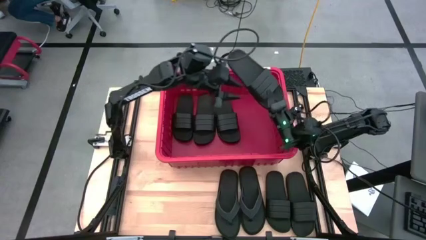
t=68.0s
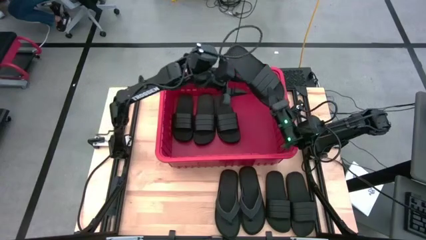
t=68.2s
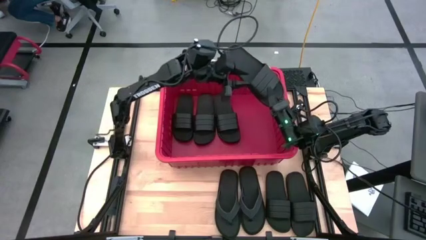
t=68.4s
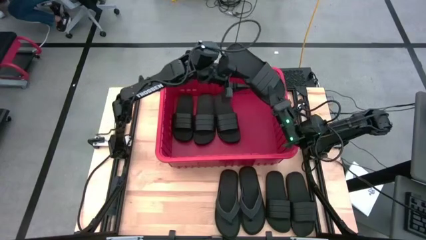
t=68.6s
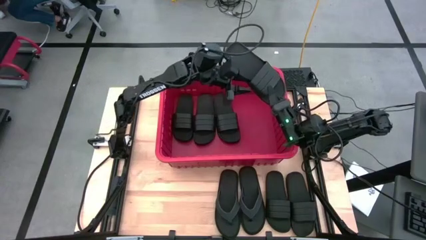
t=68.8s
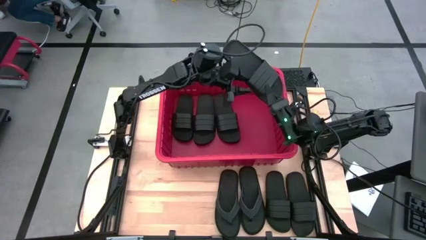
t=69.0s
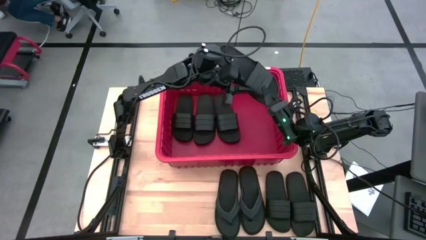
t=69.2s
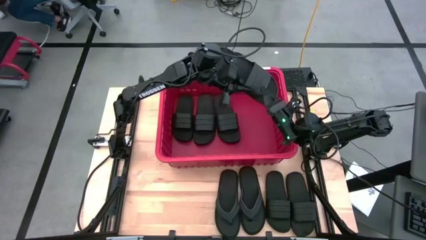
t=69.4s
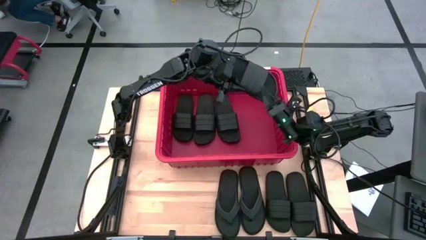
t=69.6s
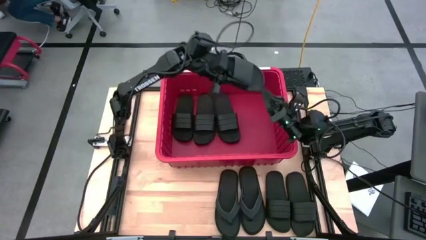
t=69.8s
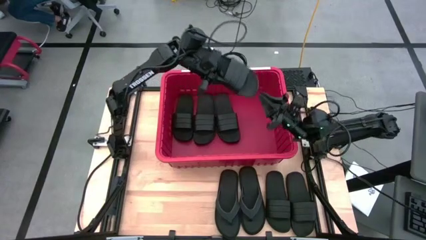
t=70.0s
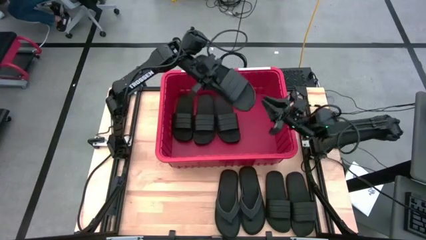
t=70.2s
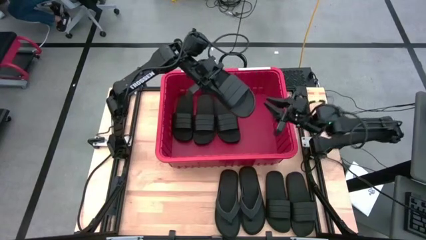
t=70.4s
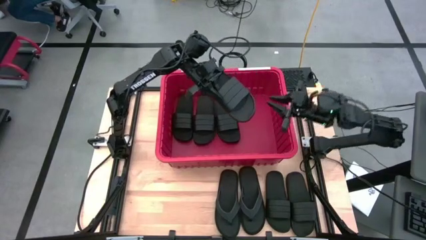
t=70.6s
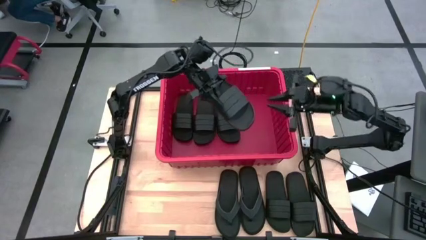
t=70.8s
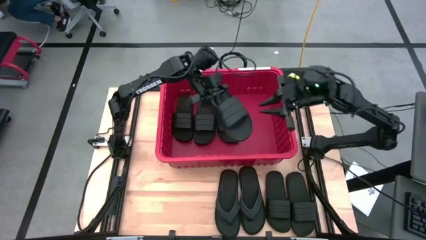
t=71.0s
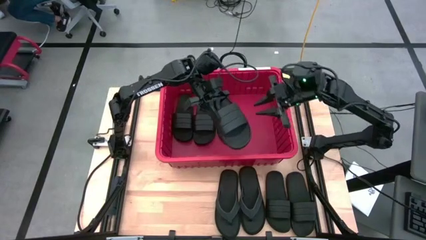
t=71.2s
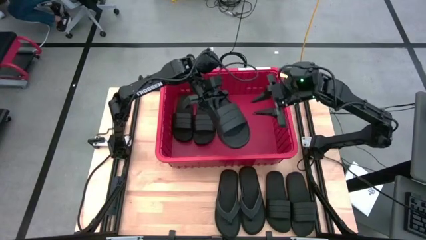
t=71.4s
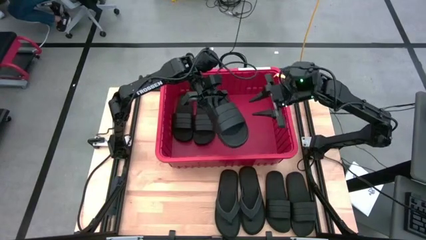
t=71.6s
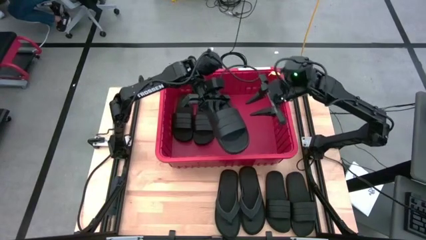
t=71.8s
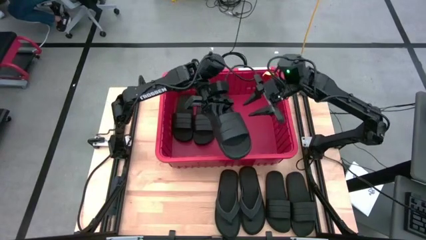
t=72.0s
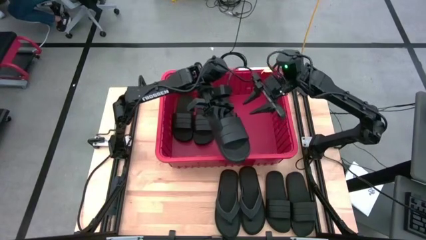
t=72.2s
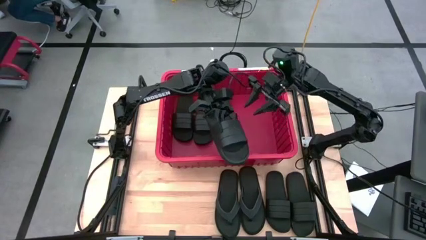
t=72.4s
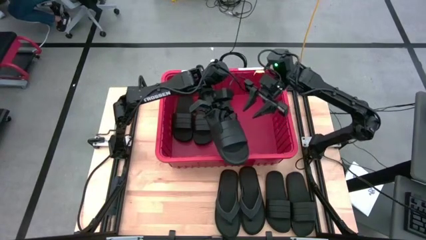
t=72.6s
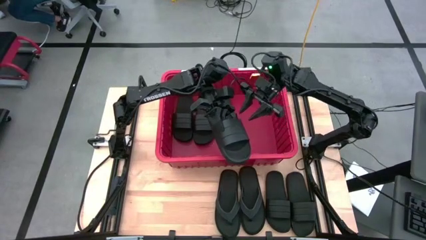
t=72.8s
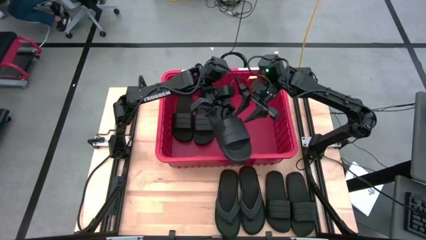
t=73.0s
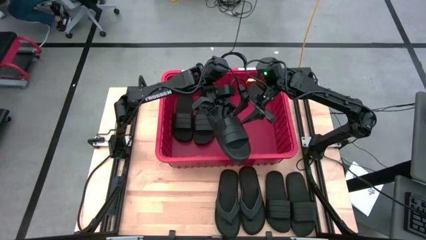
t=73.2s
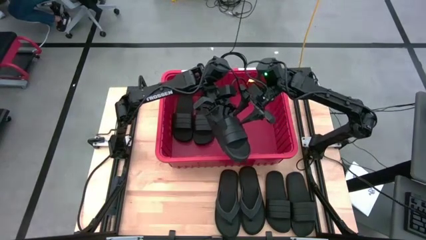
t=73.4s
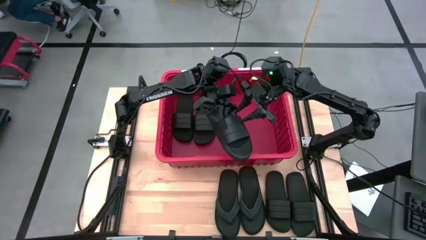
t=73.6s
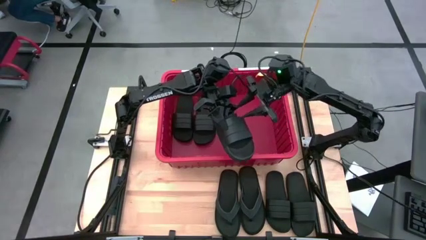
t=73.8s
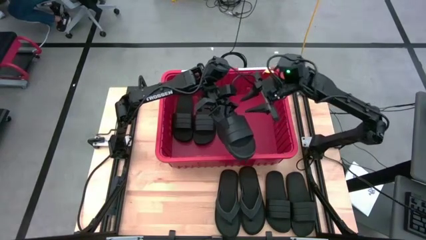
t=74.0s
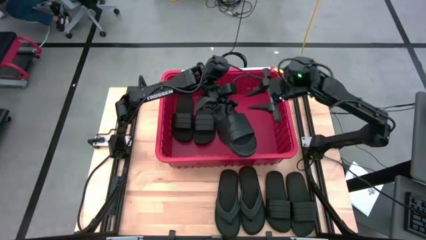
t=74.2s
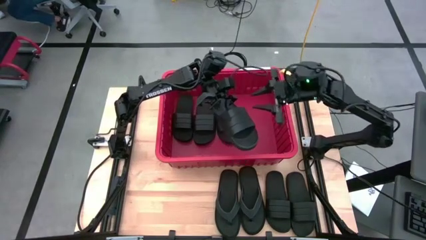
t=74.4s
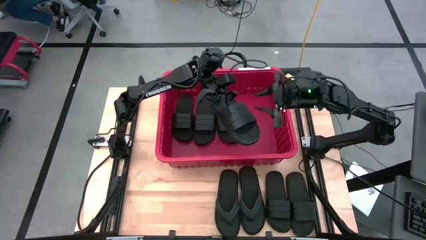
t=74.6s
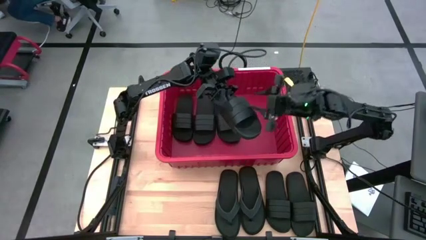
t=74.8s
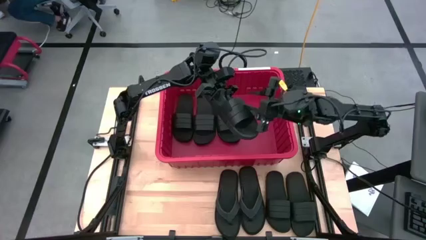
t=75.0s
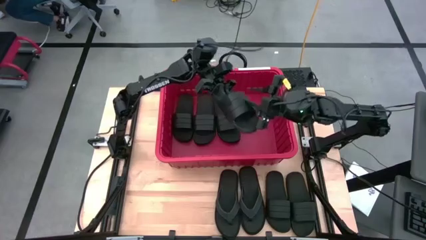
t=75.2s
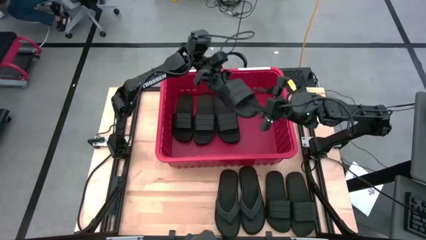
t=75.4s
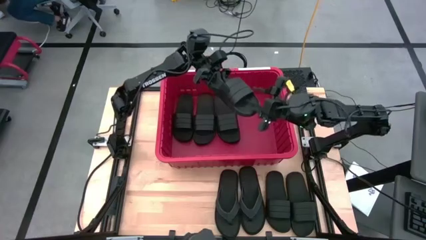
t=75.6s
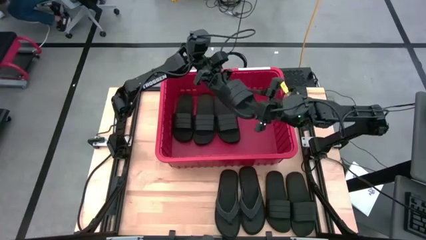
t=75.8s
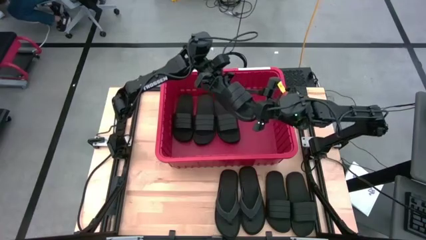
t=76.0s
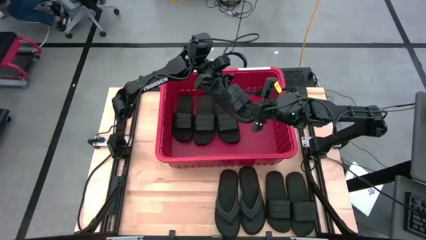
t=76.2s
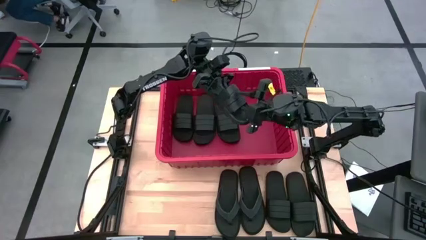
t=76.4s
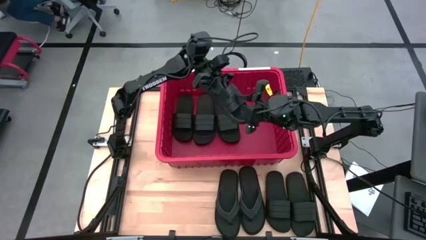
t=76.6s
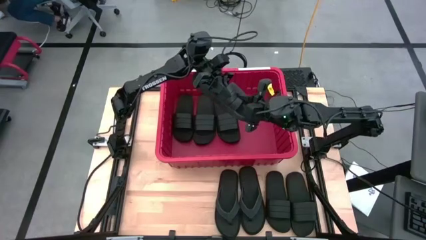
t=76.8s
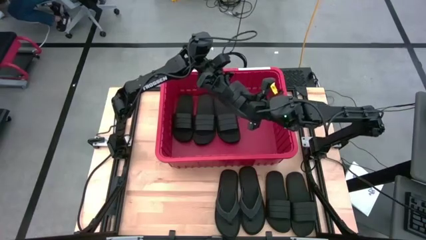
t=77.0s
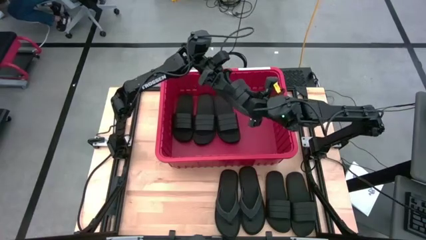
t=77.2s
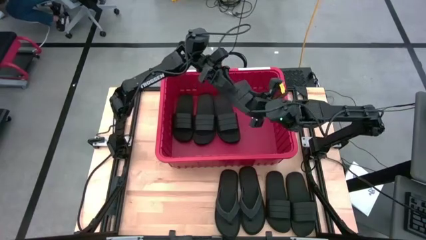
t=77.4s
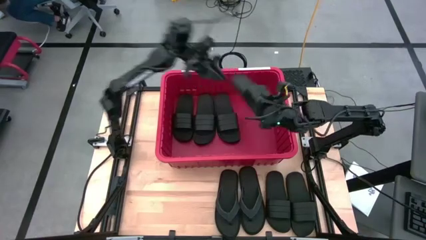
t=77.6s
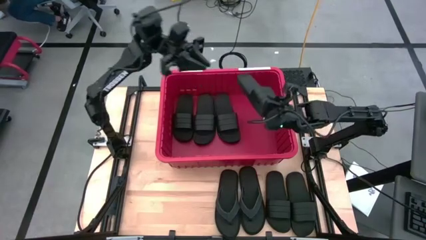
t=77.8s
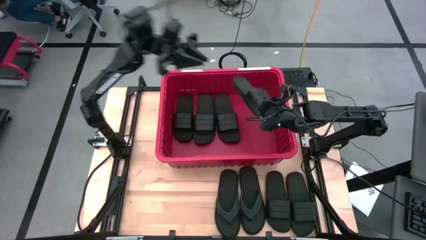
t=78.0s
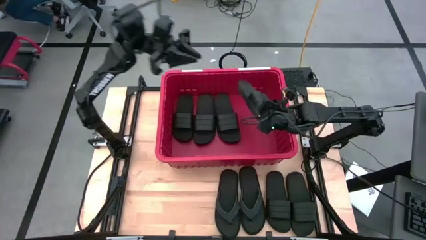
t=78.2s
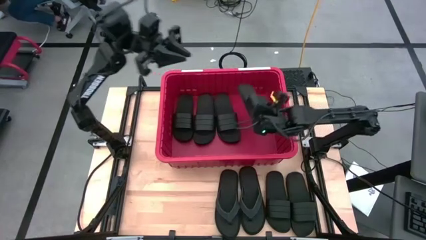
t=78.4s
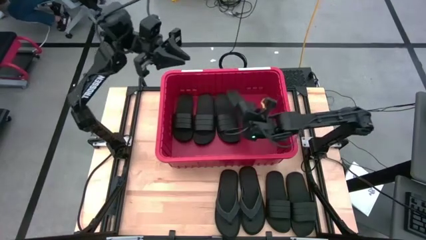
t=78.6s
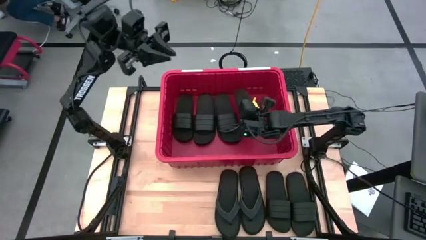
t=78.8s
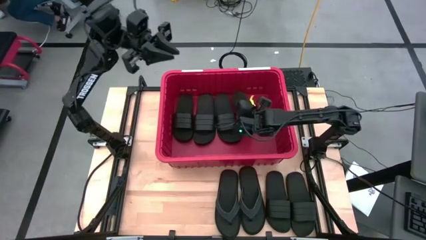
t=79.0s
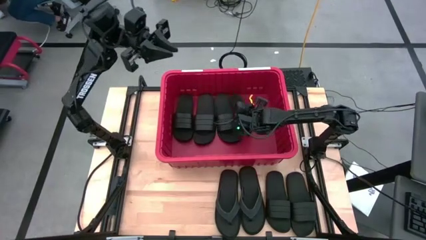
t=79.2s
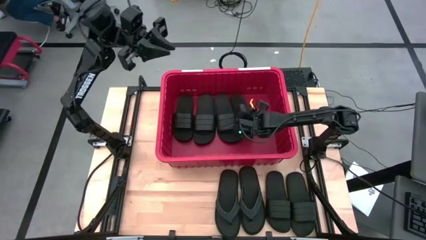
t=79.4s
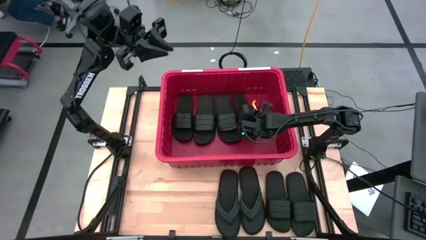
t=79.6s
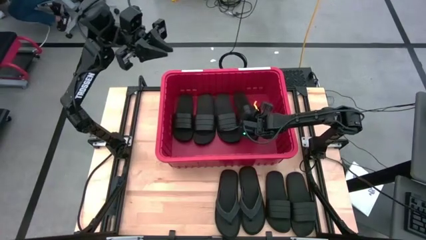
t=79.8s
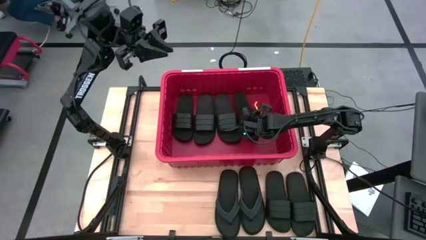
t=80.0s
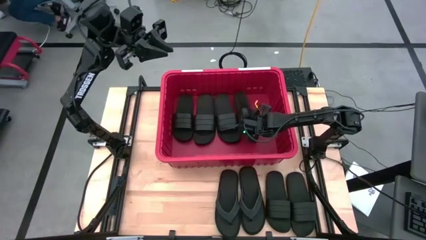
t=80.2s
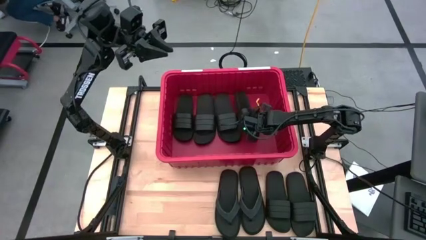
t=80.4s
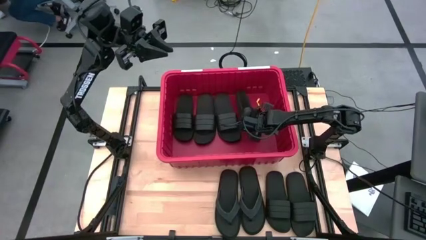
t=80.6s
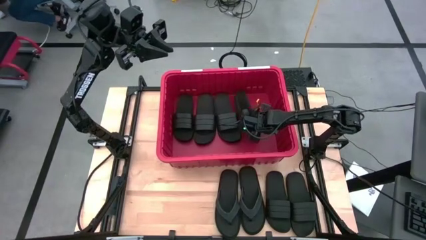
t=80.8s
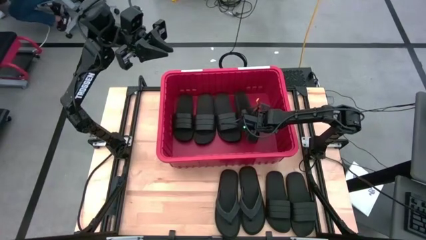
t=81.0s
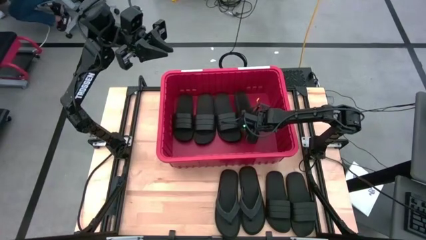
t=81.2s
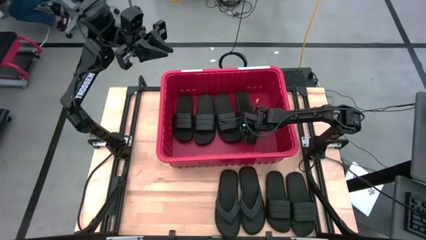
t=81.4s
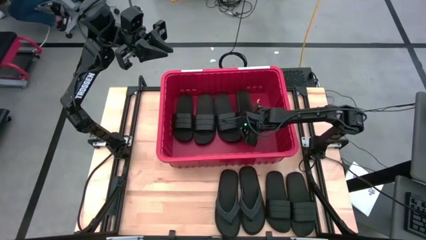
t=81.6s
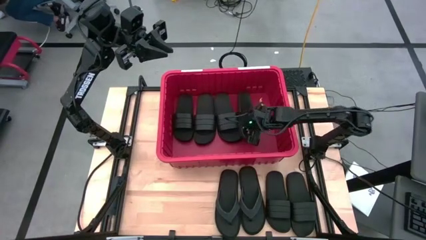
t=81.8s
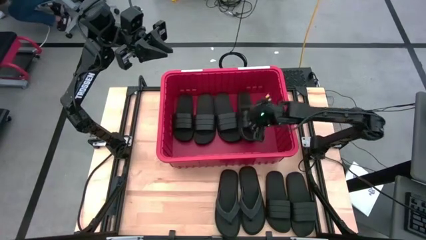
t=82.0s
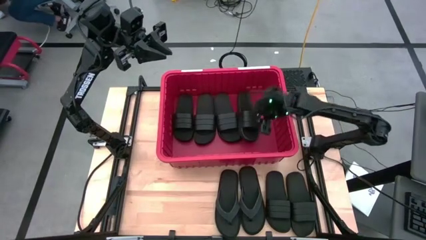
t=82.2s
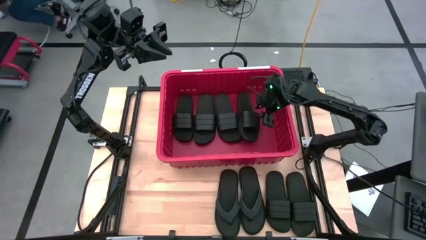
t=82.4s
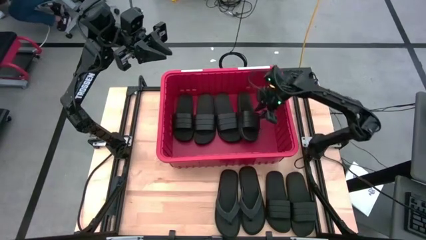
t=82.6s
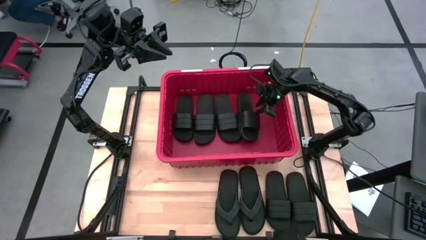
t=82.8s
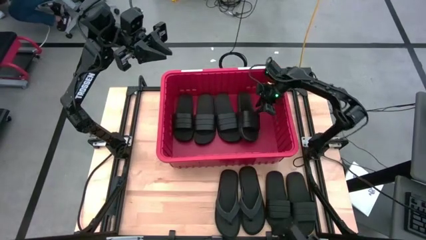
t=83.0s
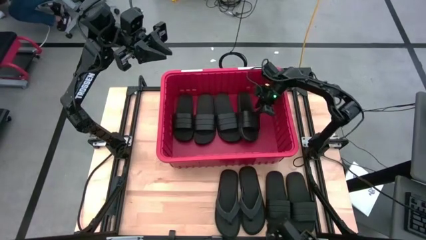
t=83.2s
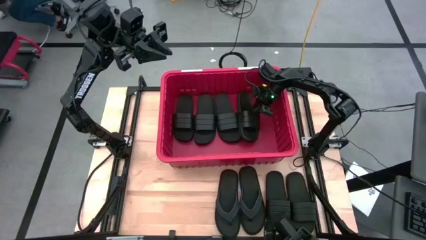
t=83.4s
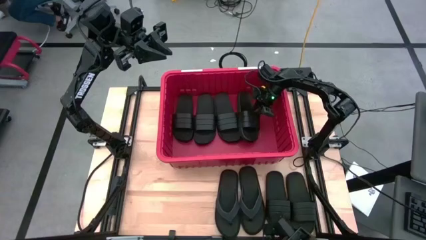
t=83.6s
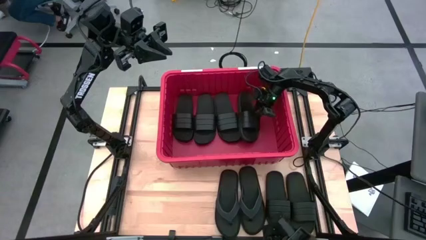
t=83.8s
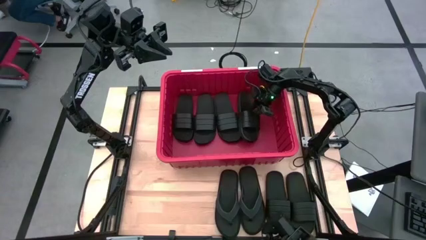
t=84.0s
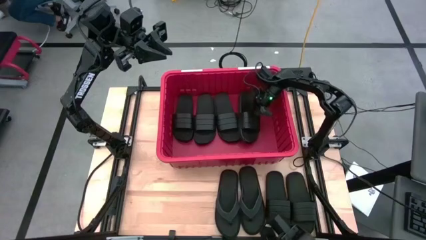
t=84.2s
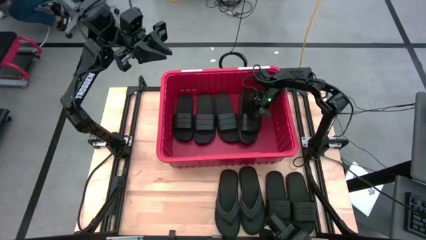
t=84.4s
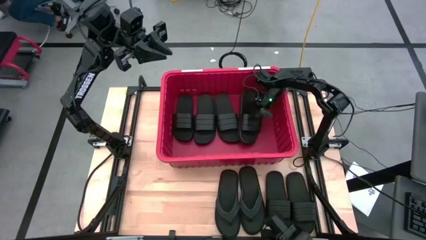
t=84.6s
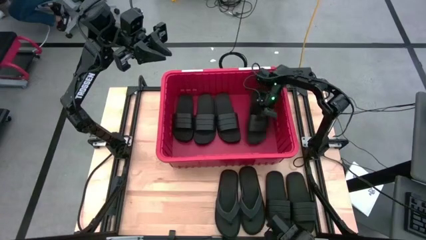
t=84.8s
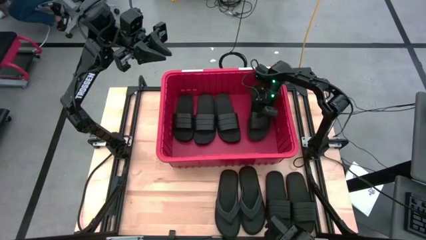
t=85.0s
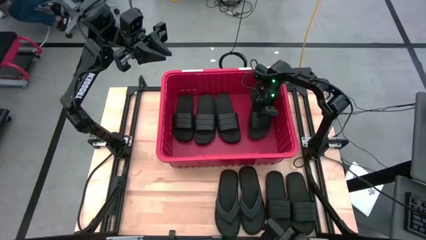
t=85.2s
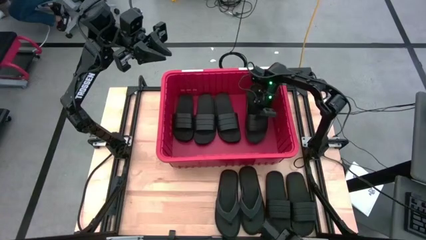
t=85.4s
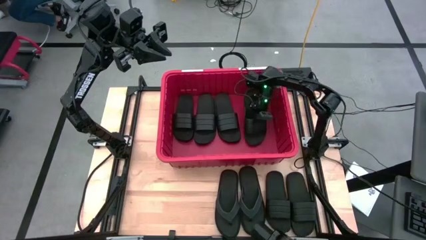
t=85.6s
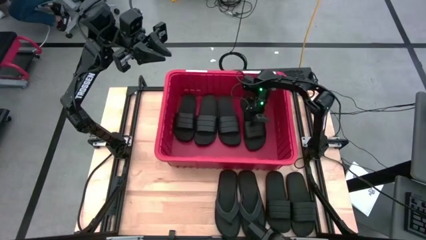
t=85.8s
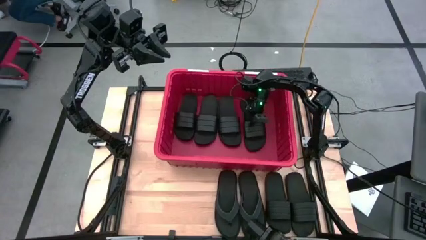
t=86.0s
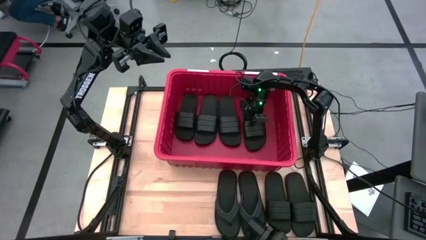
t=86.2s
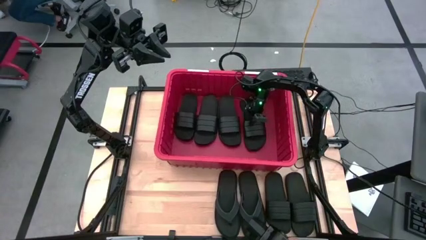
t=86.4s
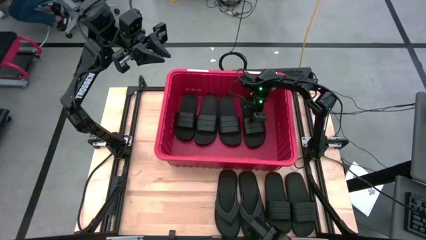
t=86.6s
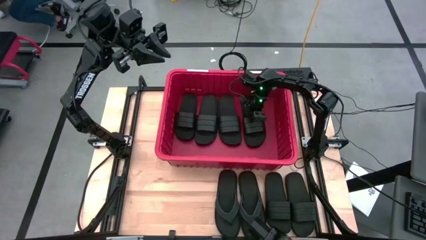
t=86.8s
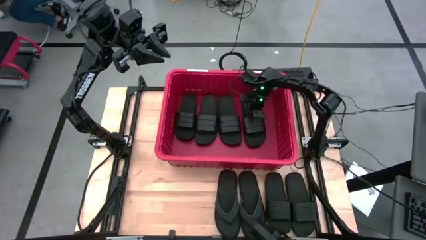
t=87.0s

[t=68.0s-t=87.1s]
Task: Pick and place slides into bin
Put the black slides into the red bin
